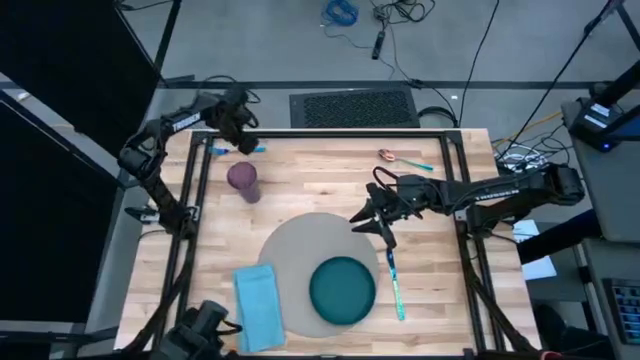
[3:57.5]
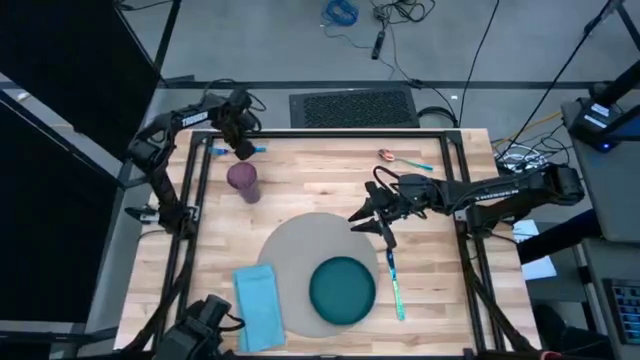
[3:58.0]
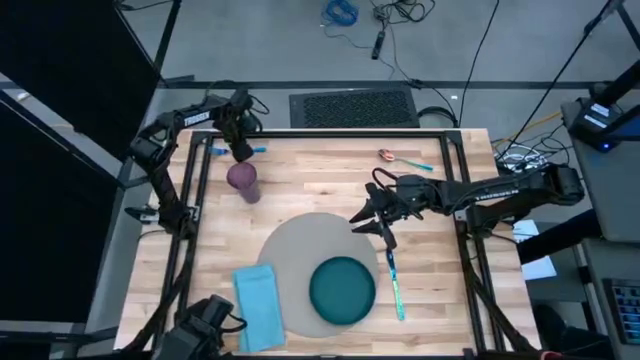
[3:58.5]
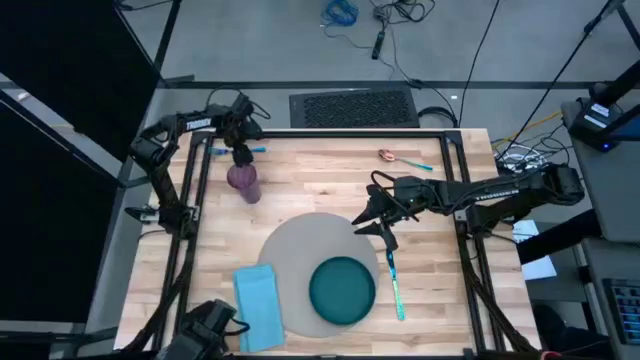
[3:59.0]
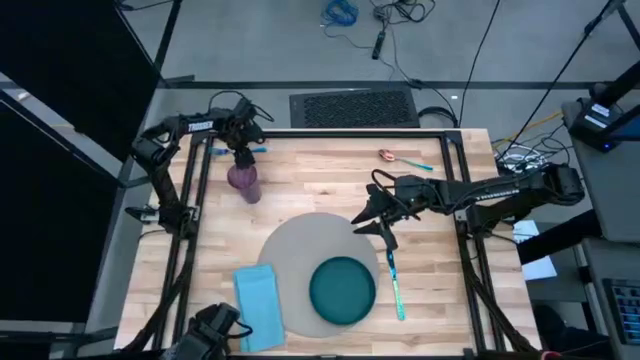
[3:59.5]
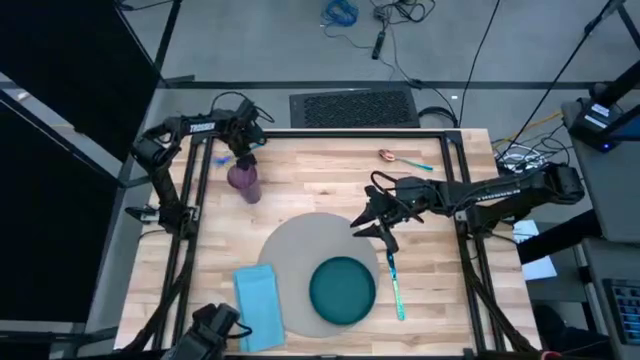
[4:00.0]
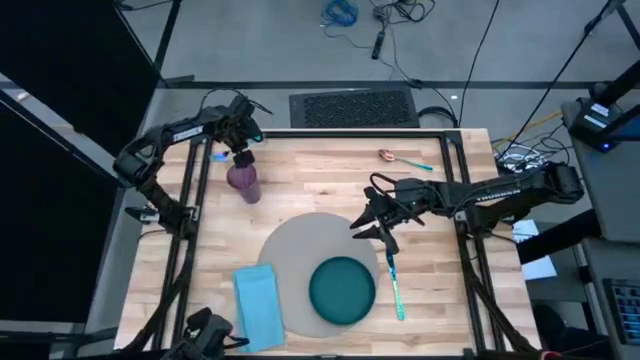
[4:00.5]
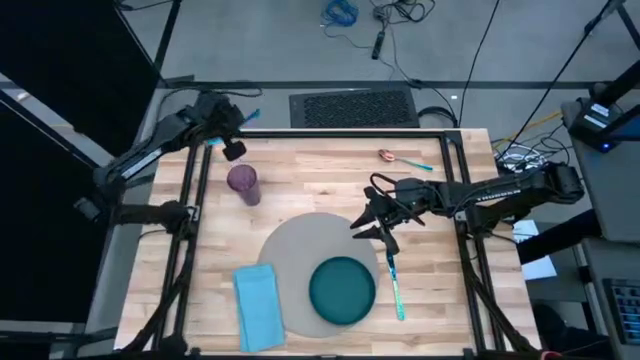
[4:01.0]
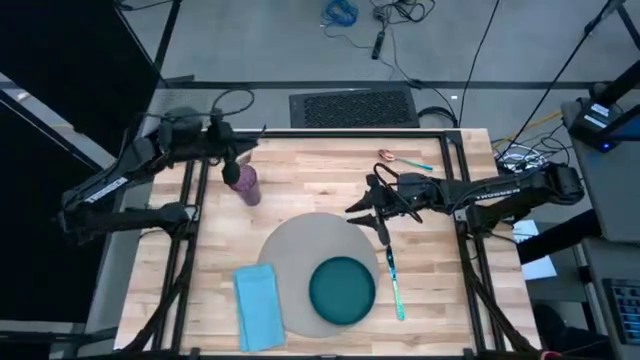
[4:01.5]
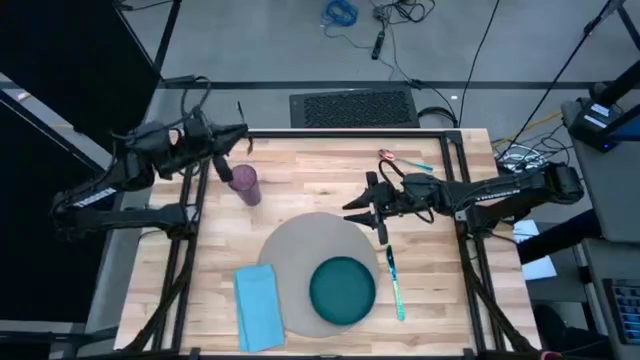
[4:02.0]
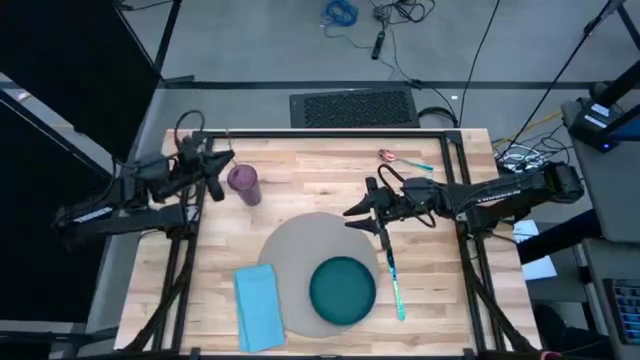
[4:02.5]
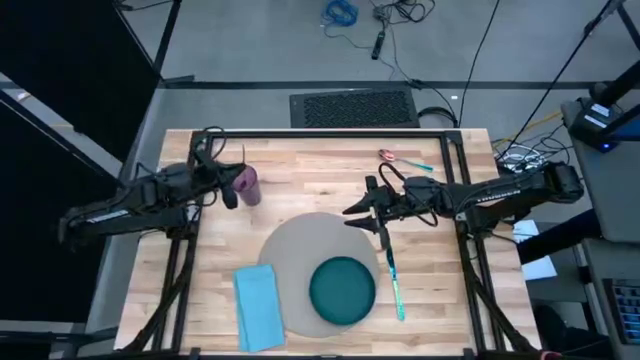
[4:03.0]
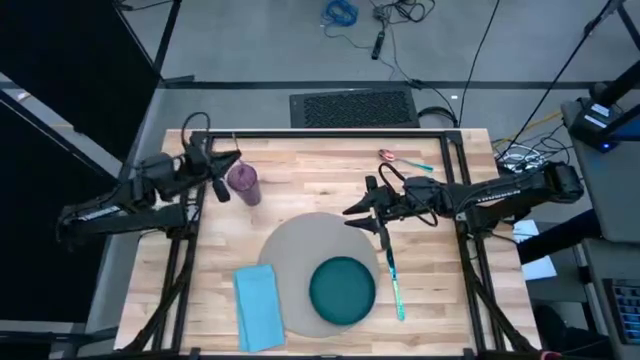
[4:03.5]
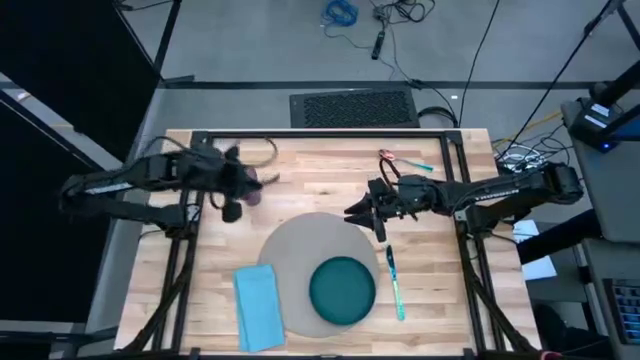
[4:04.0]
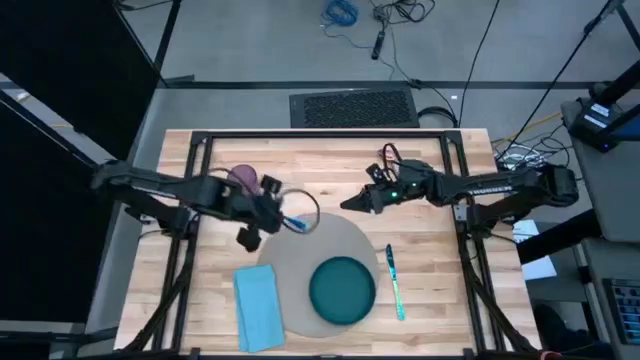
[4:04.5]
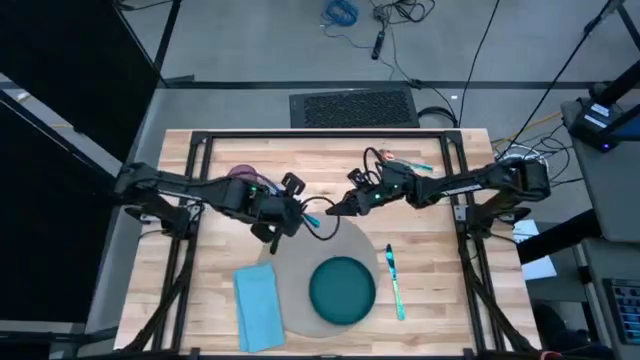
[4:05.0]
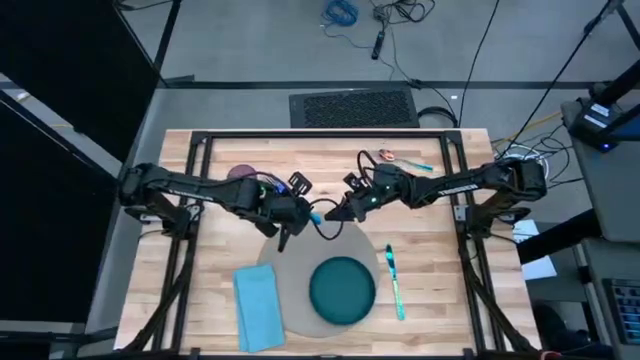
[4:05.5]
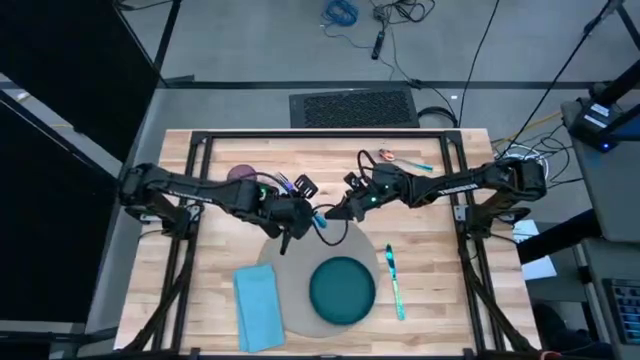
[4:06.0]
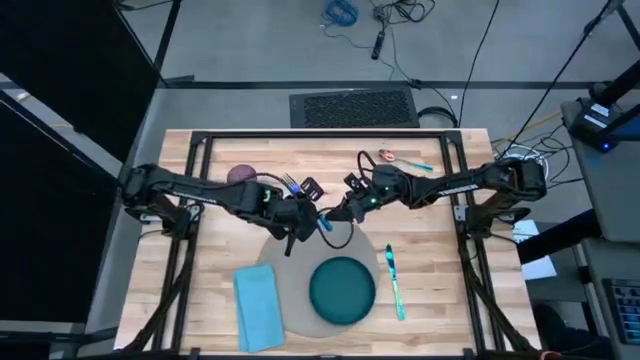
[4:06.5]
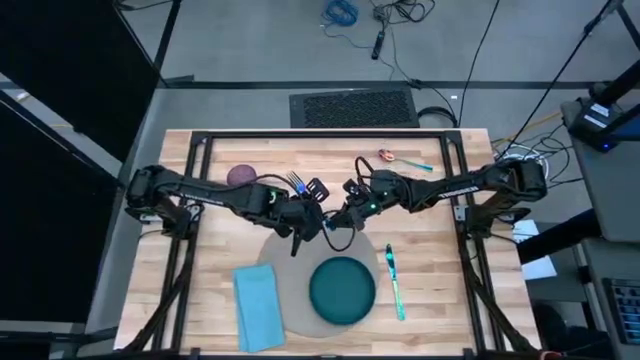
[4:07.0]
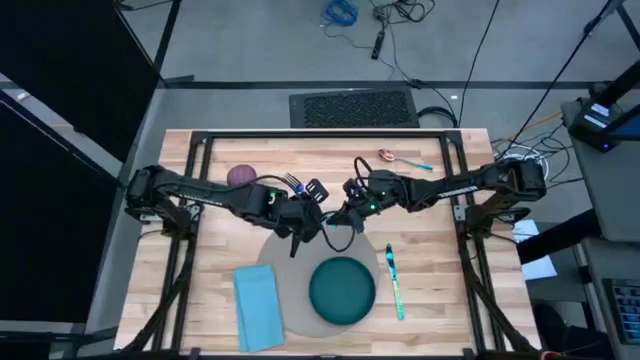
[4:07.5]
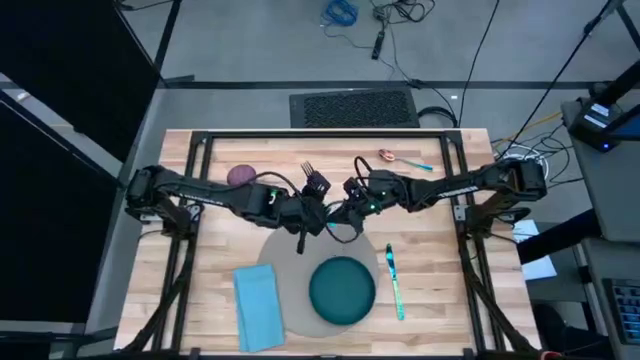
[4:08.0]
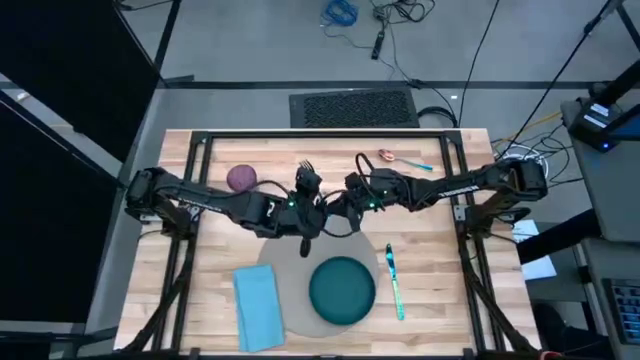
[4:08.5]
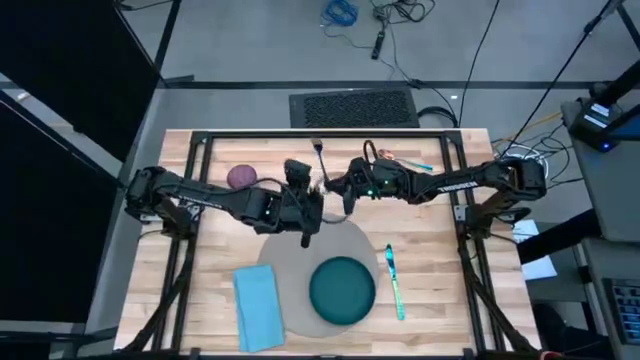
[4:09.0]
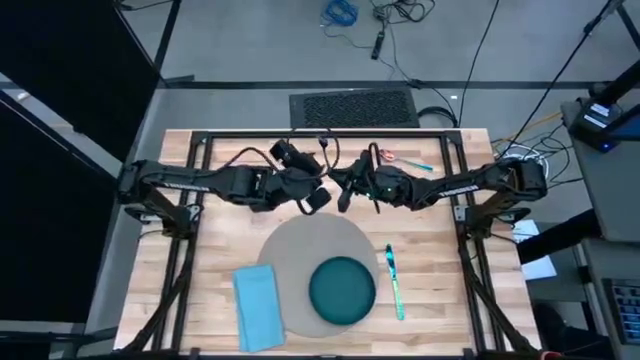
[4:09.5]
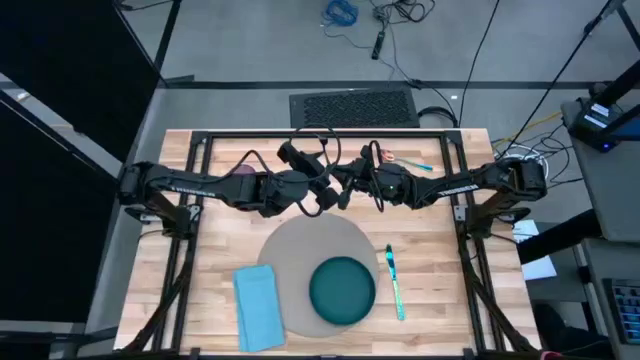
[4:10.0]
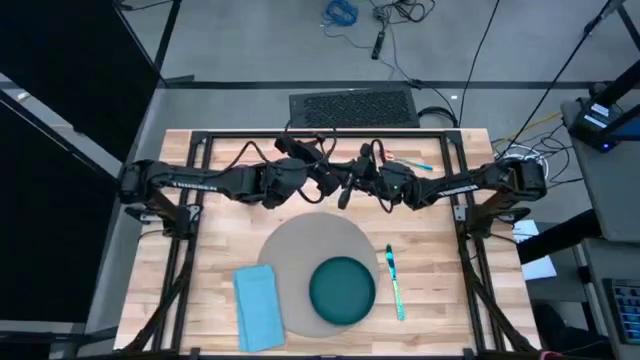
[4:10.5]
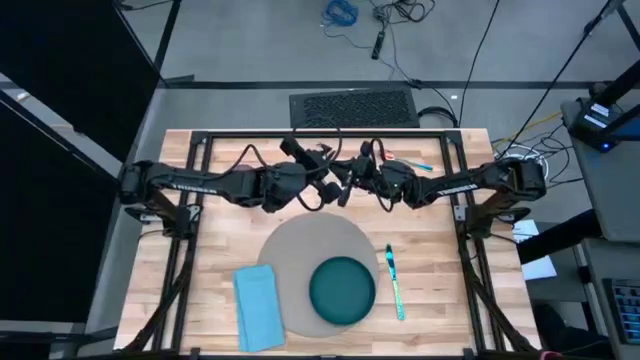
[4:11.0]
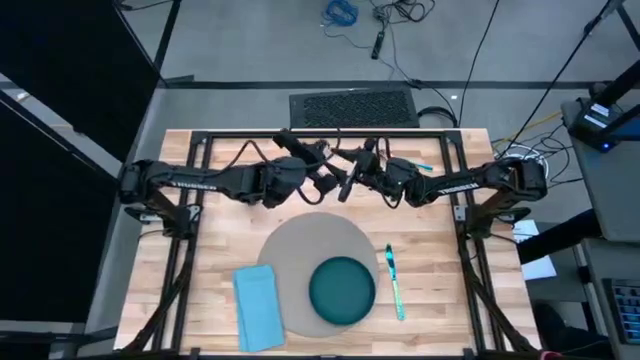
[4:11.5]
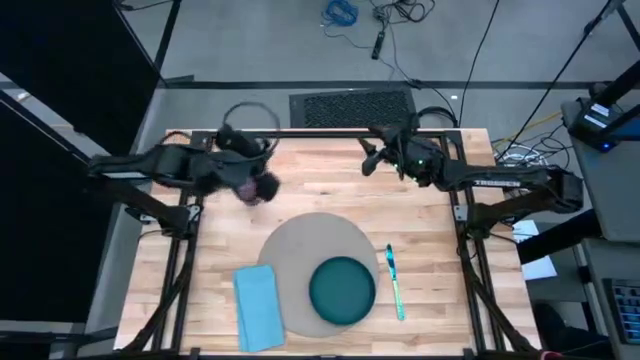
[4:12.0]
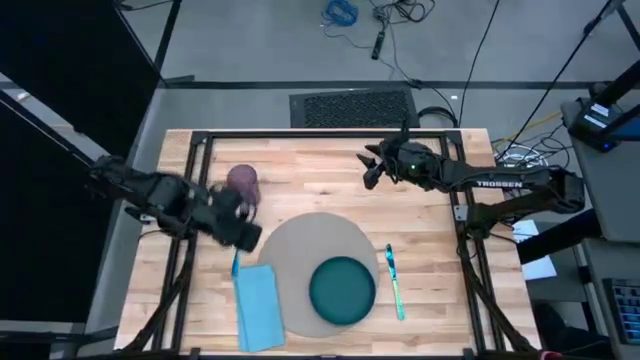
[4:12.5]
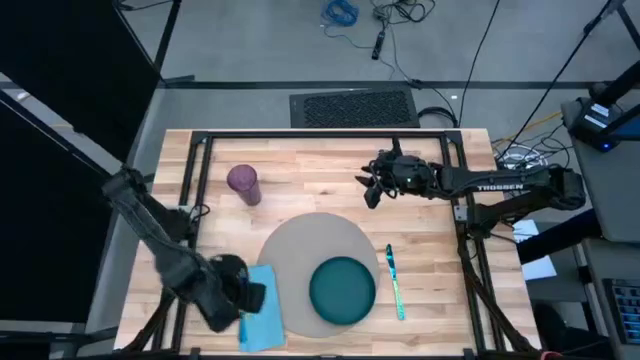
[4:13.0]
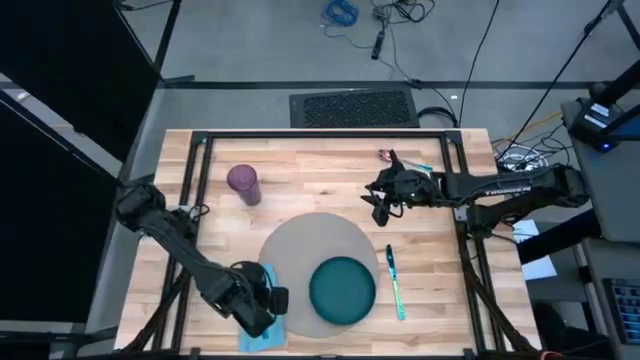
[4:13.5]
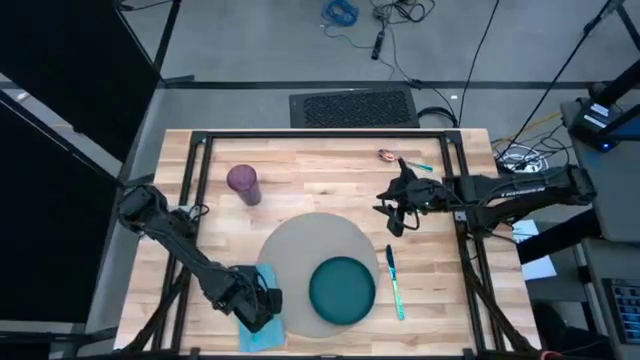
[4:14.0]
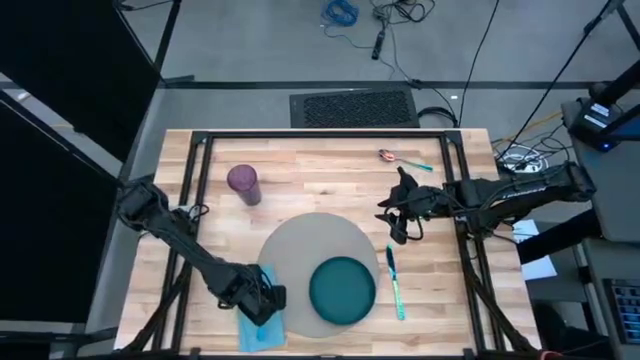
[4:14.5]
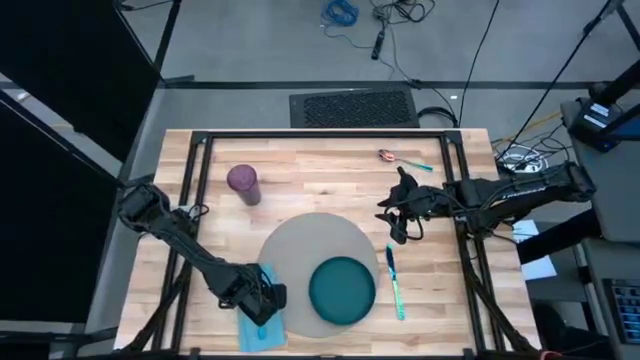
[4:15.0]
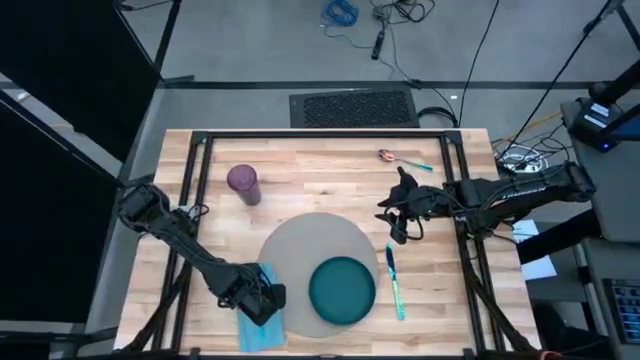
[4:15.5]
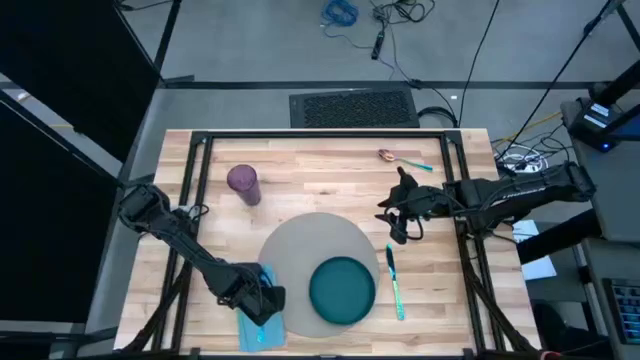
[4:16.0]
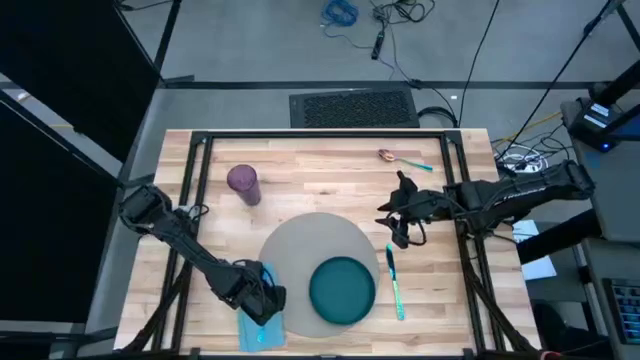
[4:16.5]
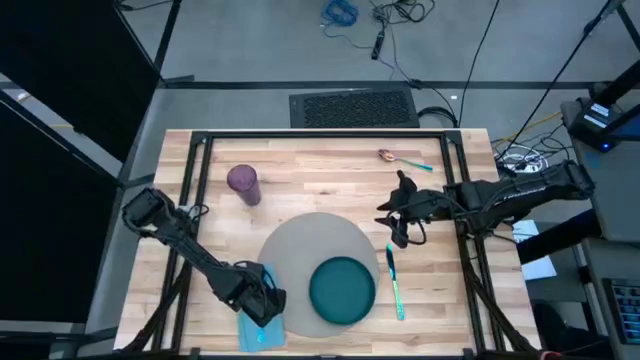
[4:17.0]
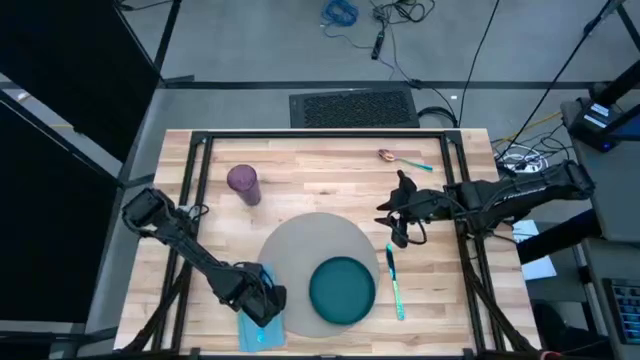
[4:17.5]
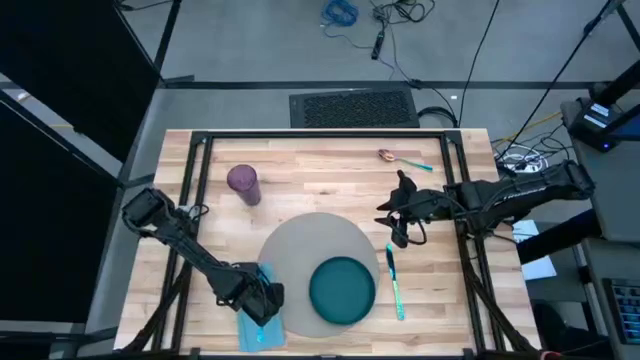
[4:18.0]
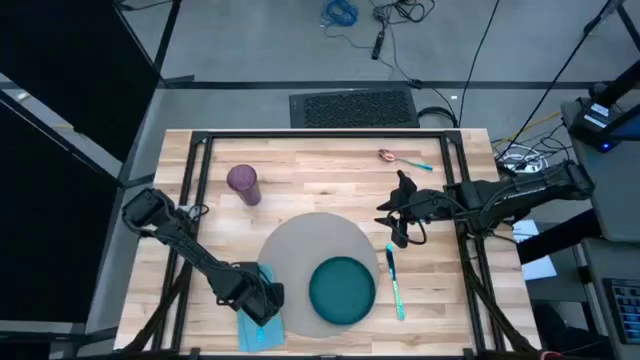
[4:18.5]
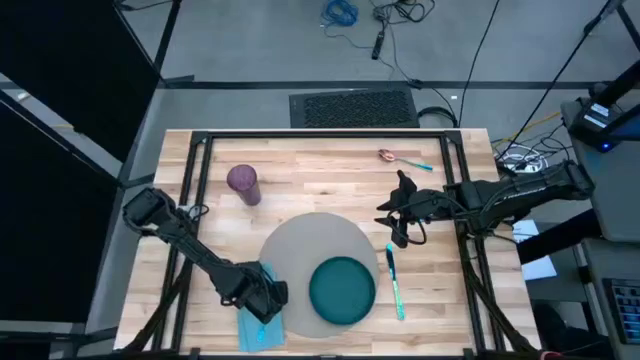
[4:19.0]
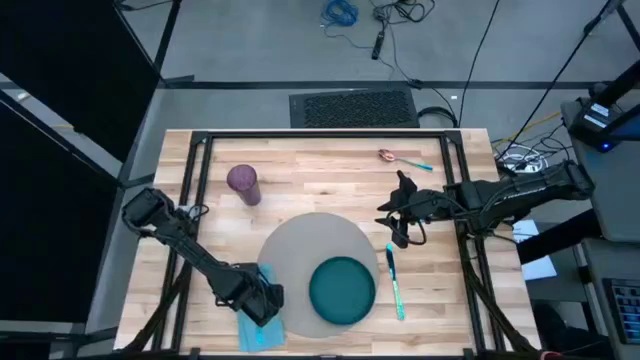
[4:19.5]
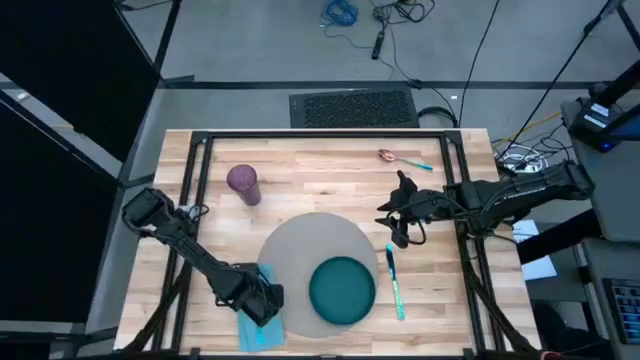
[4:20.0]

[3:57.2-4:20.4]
Task: Set table place
Put the iridescent fork on the blue napkin
